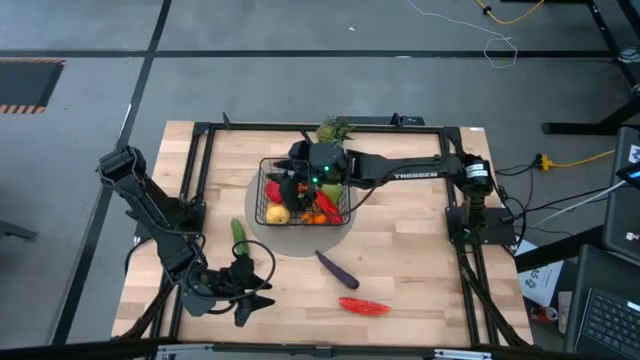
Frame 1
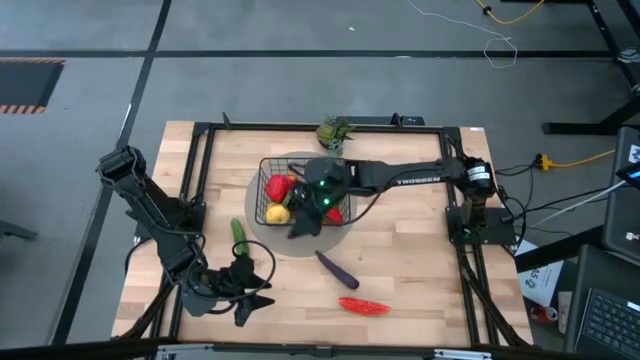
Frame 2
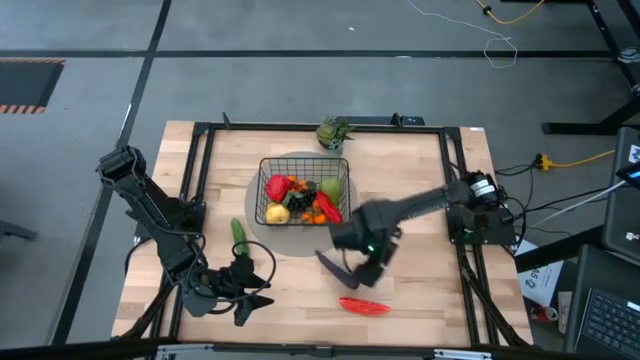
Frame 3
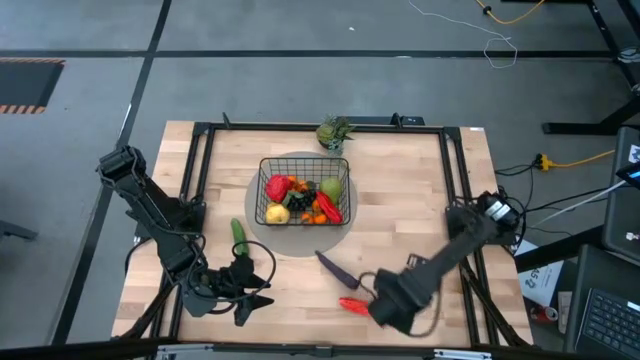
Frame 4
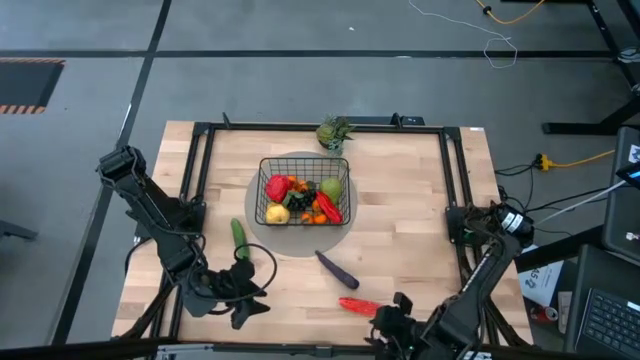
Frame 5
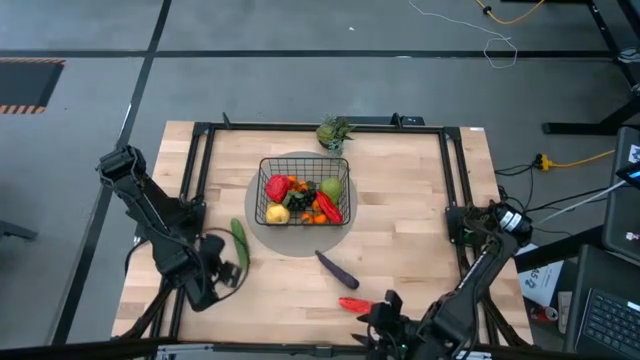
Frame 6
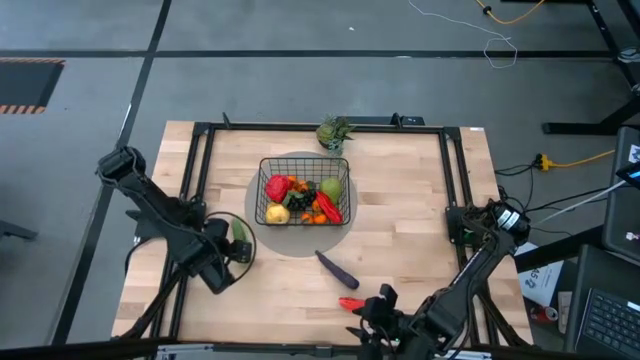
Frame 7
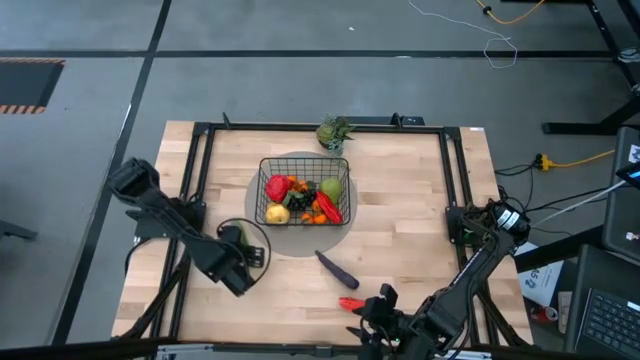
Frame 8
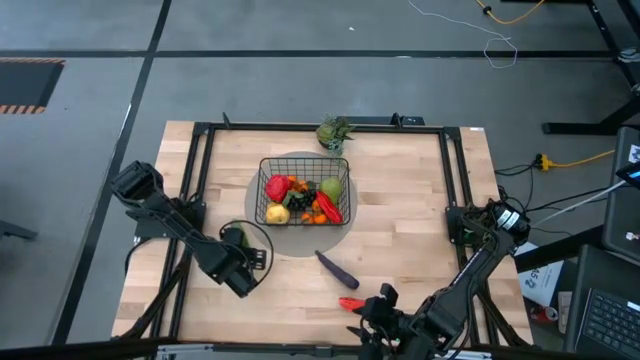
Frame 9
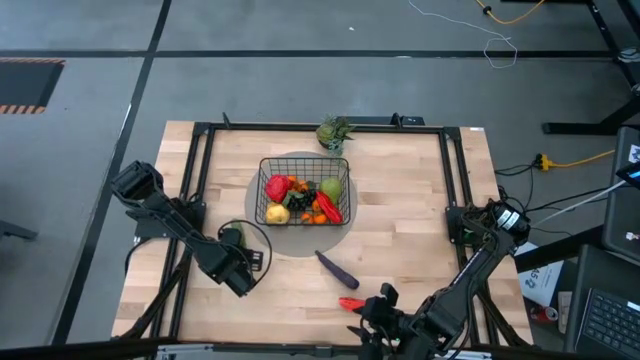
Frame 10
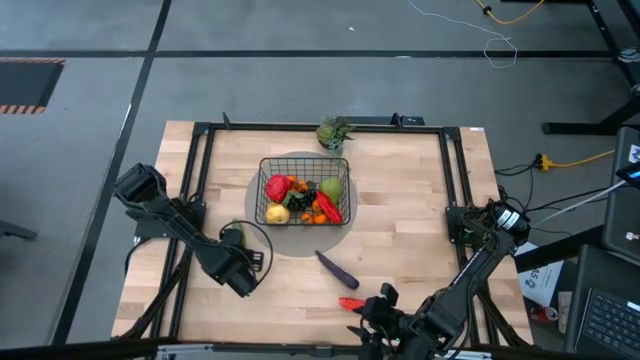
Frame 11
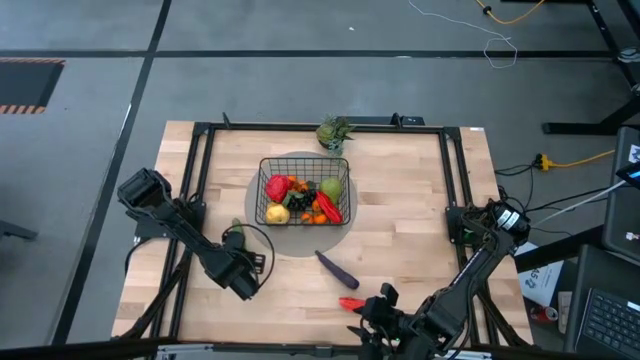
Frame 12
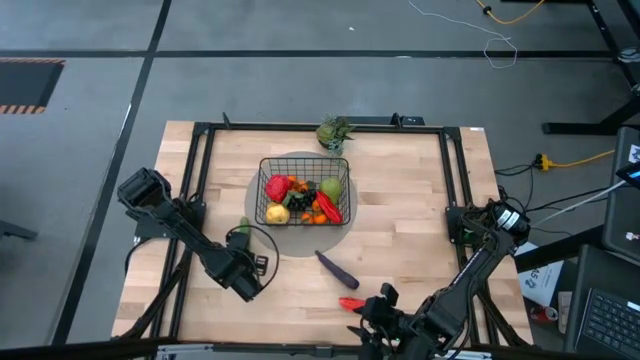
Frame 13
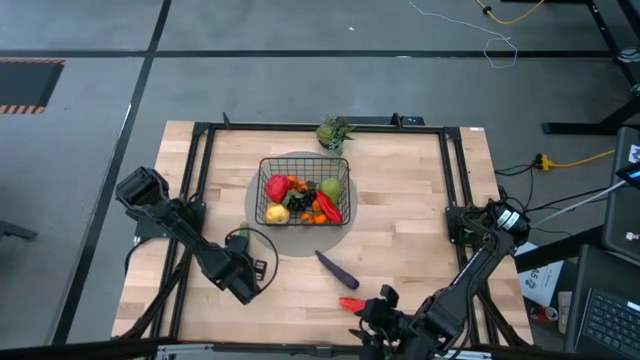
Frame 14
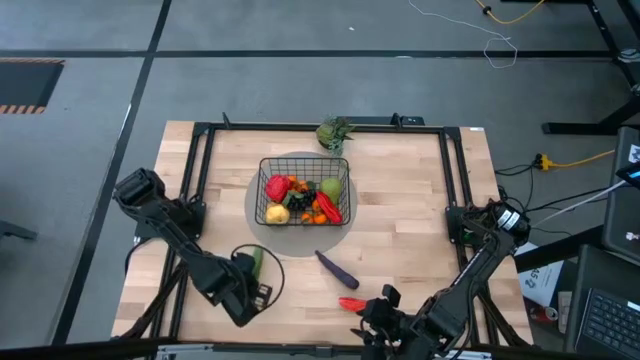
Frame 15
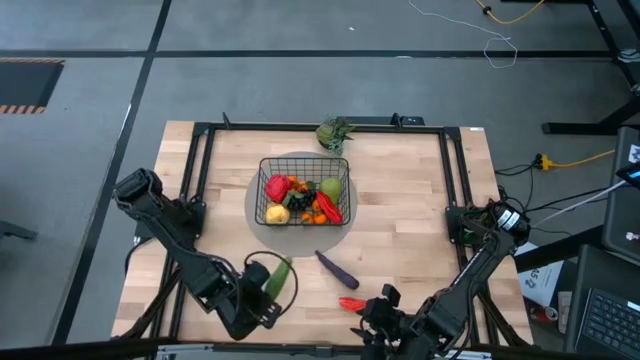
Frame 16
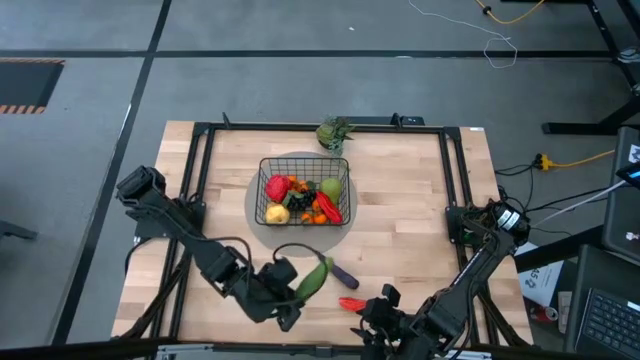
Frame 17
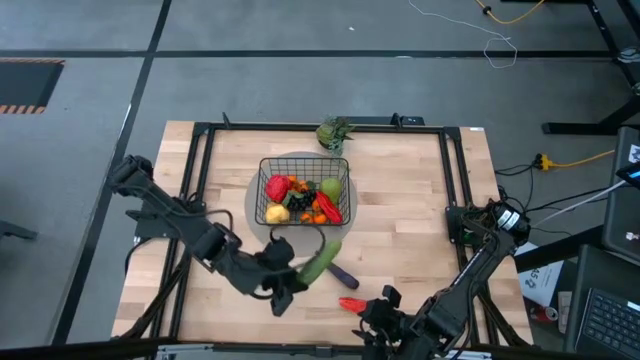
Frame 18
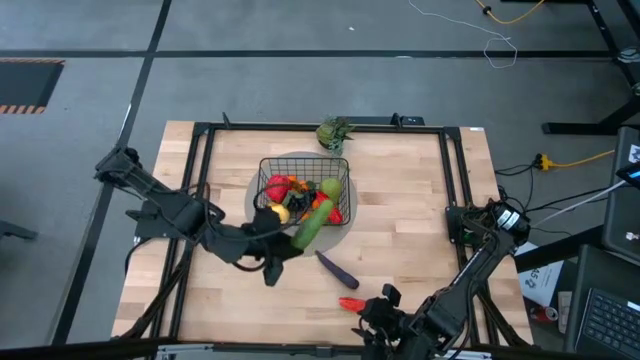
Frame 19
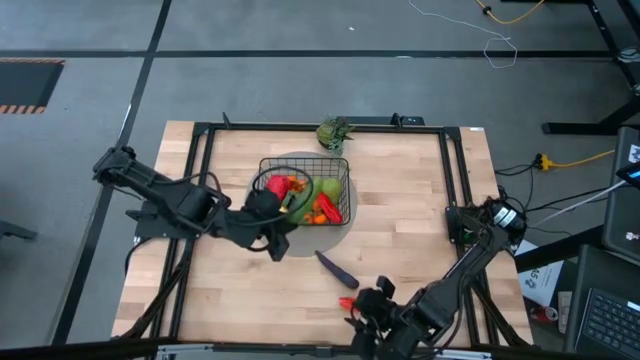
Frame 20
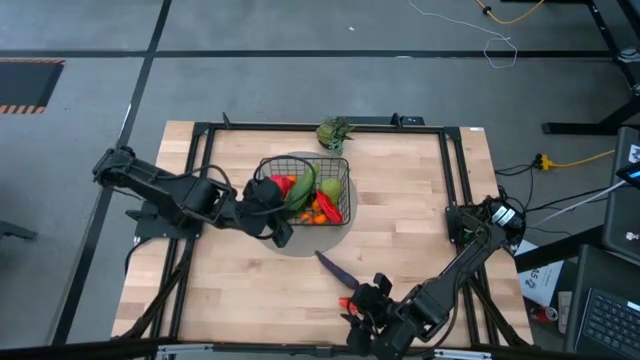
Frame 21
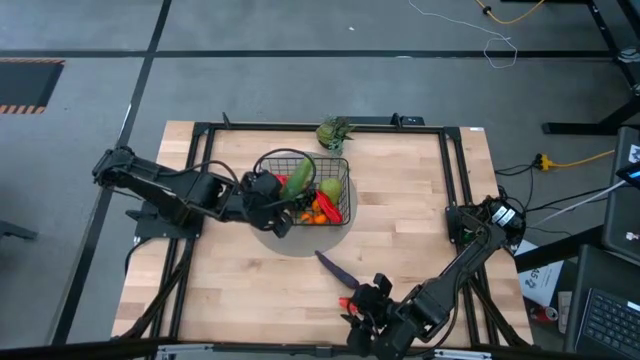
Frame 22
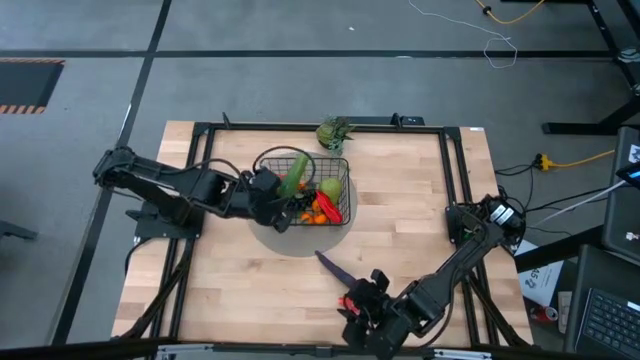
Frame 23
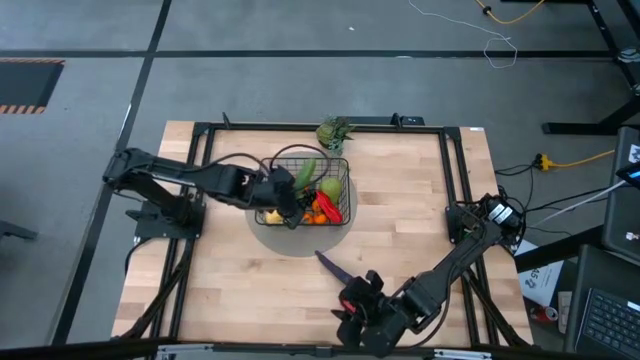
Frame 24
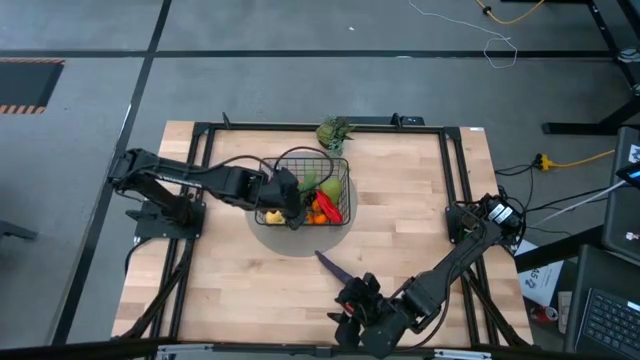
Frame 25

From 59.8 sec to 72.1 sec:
Task: Build produce basket
Put the green cucumber into the black wire basket

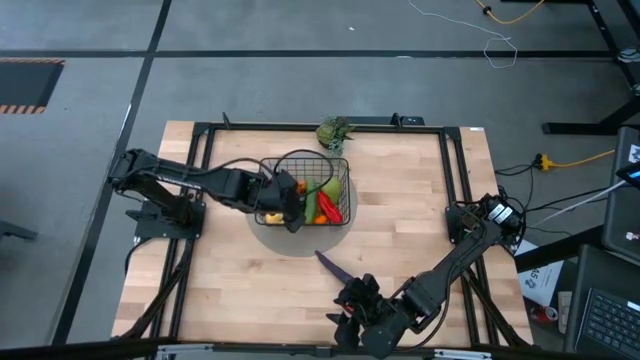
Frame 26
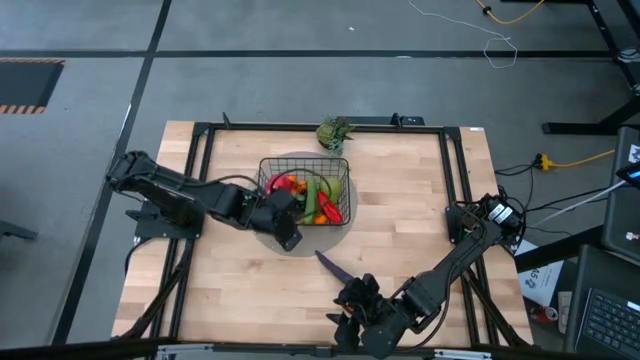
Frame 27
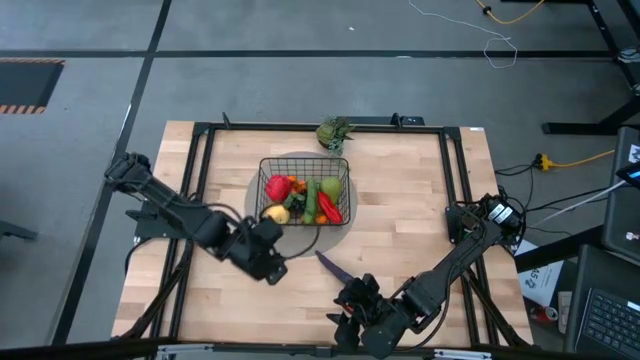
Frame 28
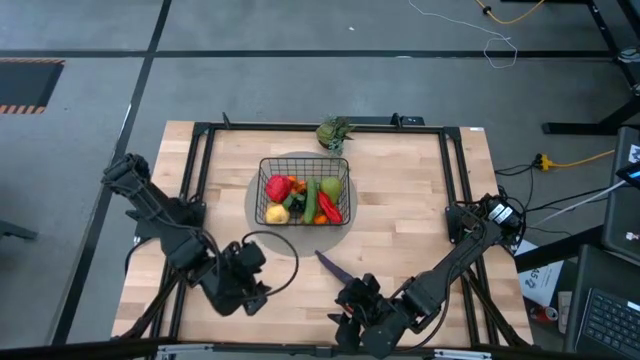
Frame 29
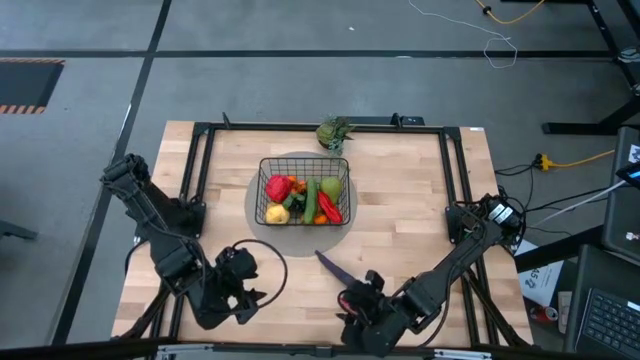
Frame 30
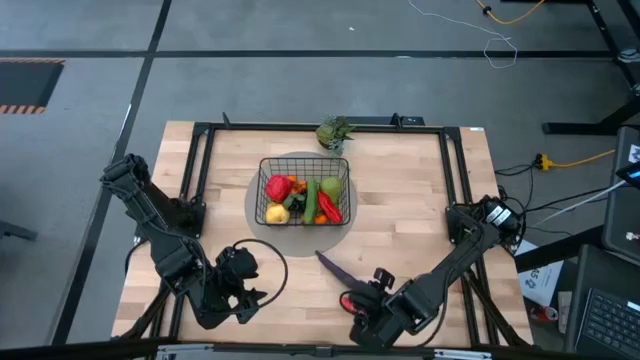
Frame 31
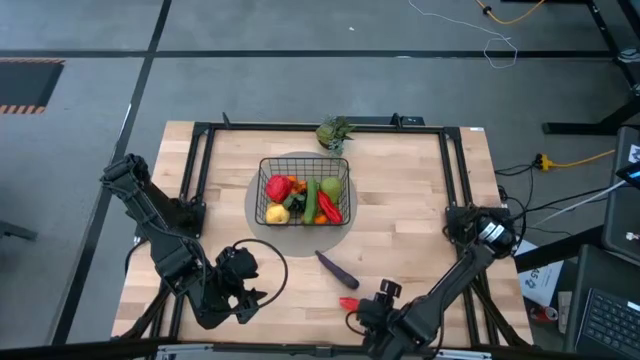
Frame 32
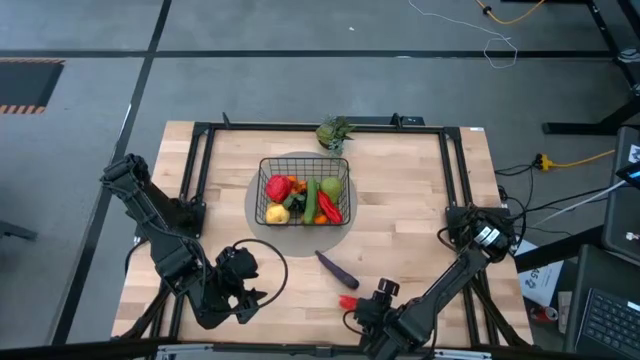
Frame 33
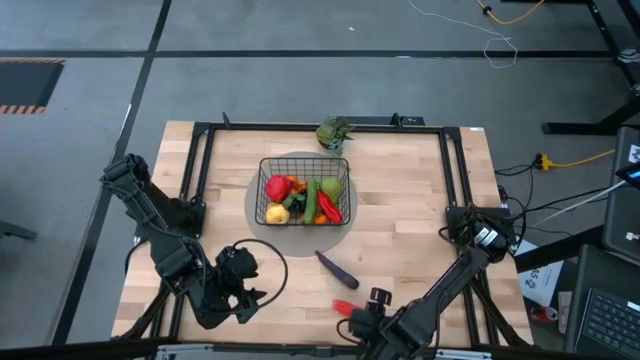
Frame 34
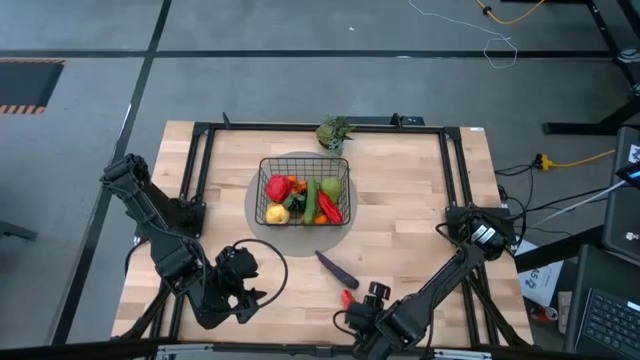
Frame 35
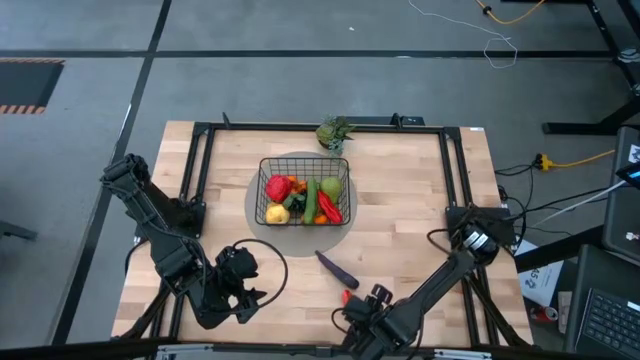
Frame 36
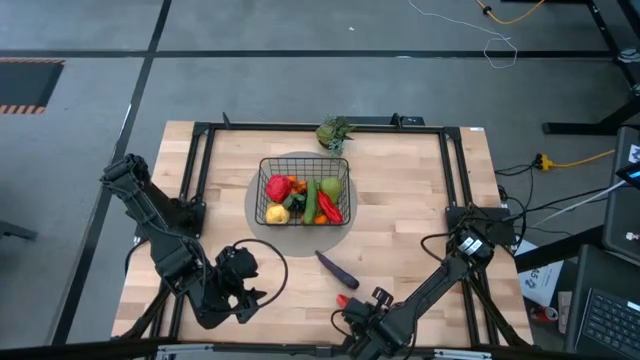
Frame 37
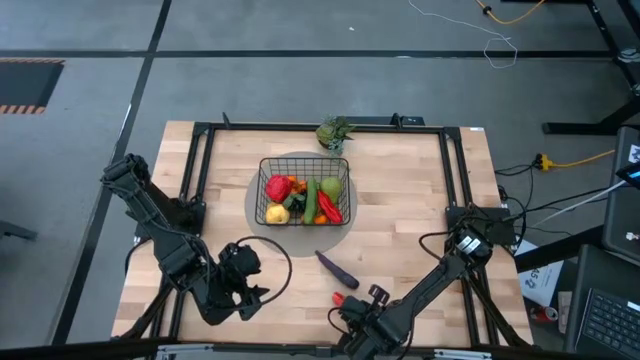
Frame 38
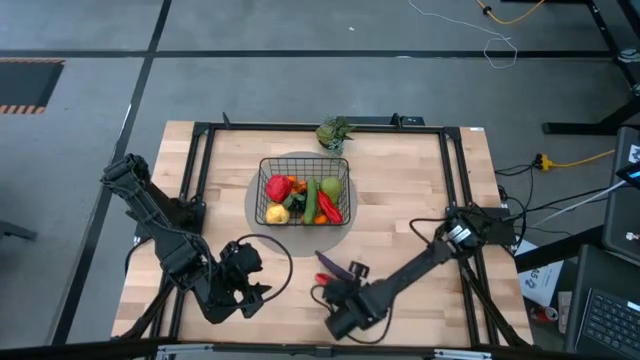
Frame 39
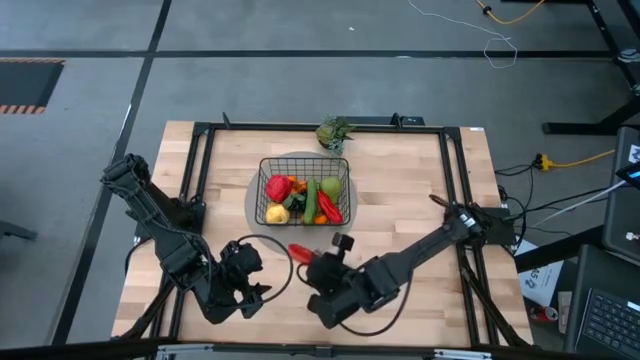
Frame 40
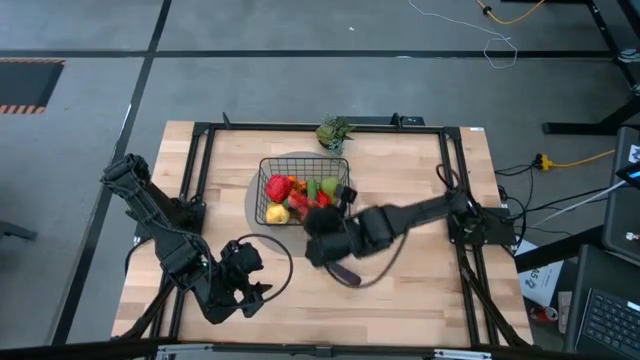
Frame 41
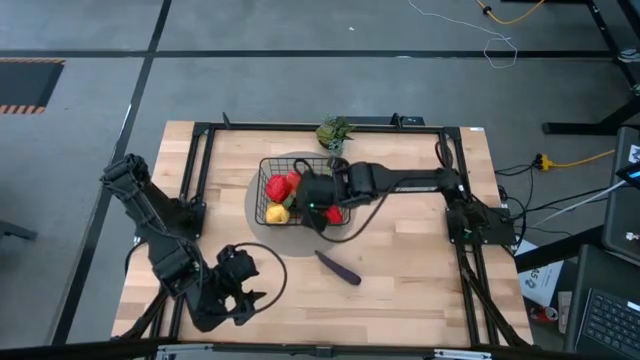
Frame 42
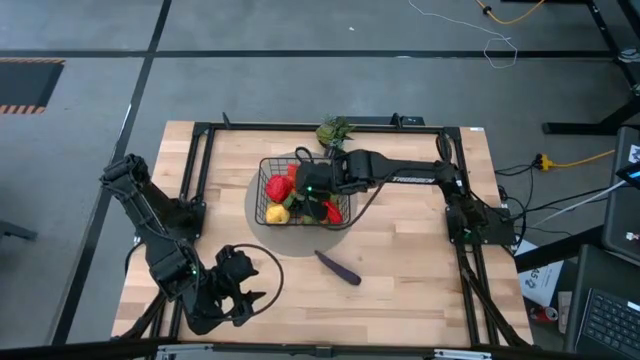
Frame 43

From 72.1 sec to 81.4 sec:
Put the red sliced watermelon into the black wire basket
